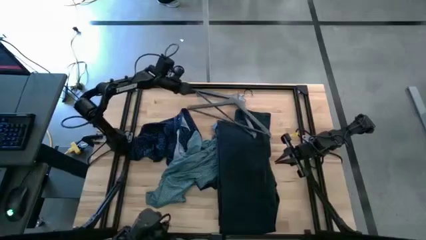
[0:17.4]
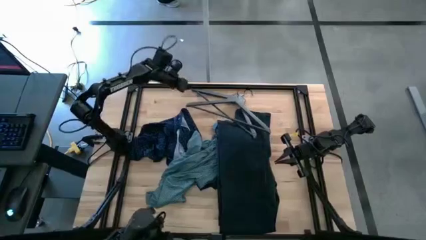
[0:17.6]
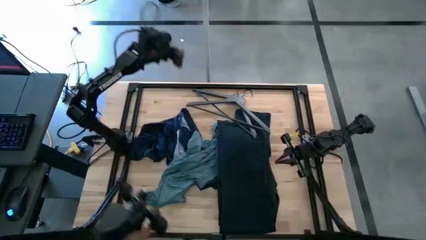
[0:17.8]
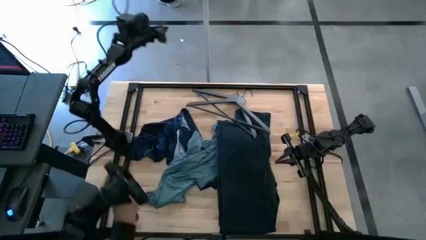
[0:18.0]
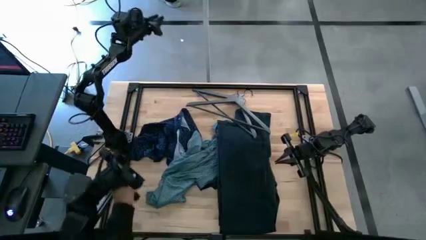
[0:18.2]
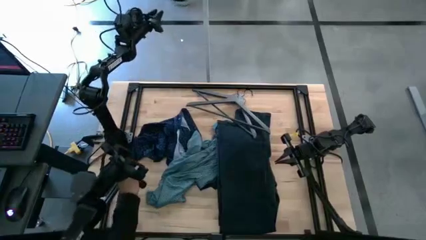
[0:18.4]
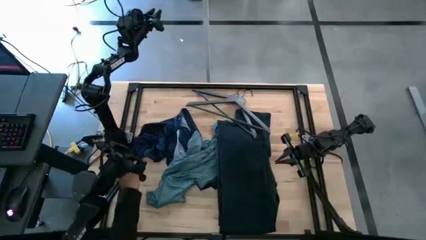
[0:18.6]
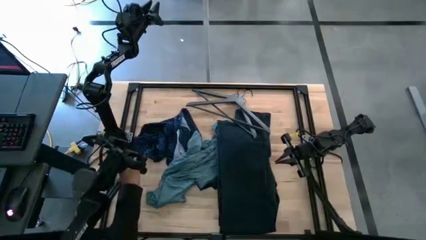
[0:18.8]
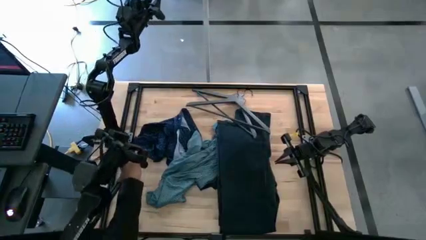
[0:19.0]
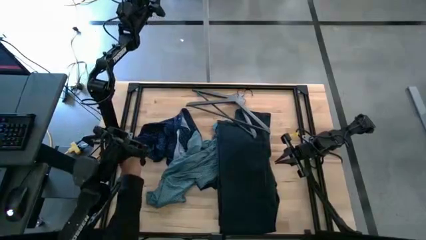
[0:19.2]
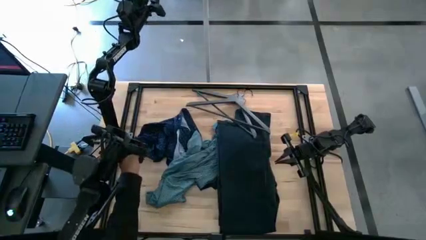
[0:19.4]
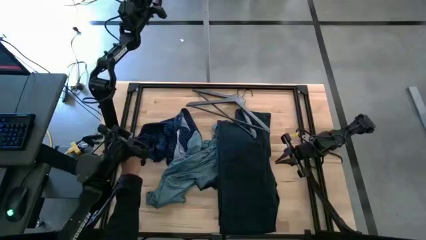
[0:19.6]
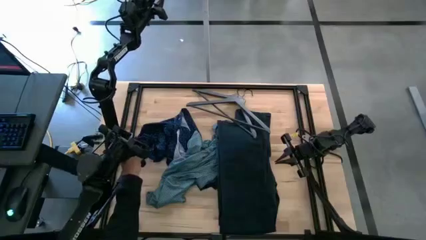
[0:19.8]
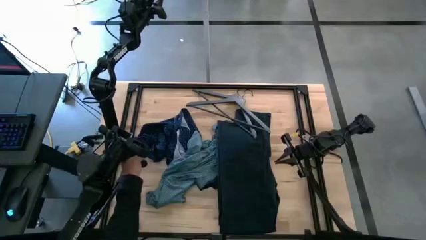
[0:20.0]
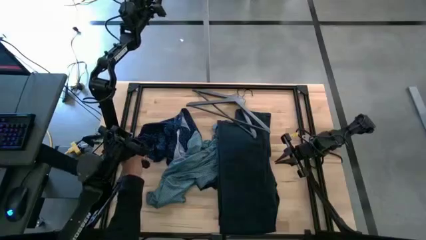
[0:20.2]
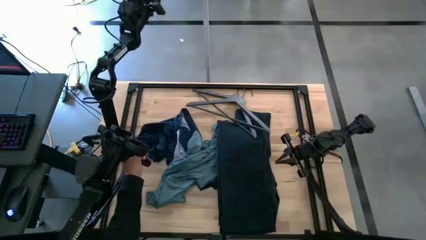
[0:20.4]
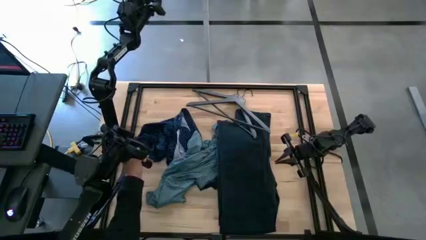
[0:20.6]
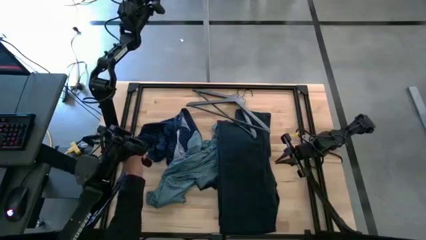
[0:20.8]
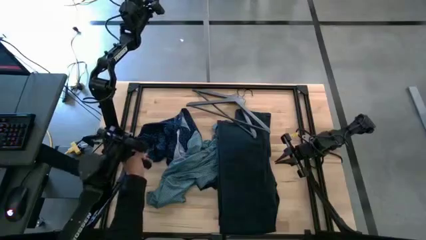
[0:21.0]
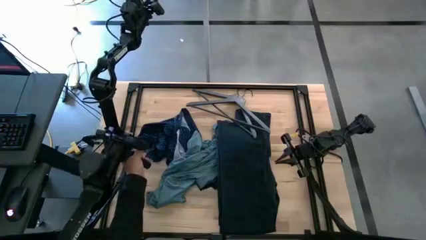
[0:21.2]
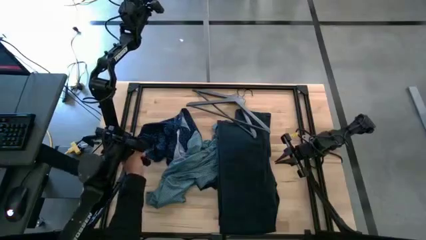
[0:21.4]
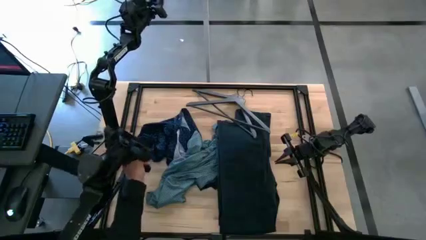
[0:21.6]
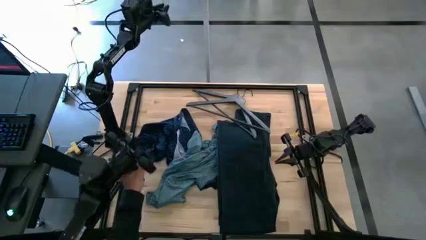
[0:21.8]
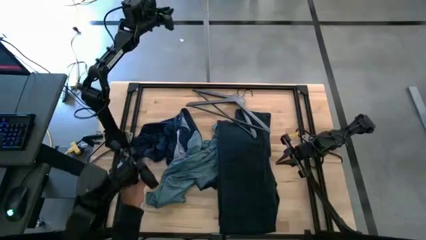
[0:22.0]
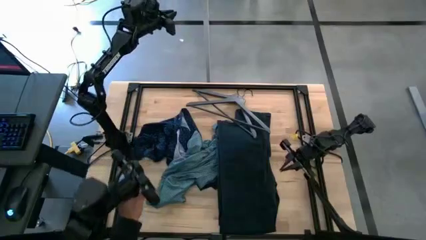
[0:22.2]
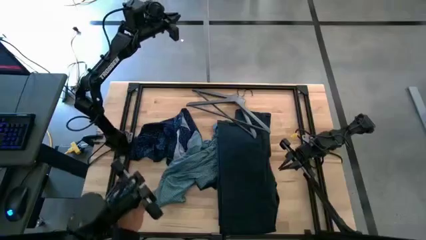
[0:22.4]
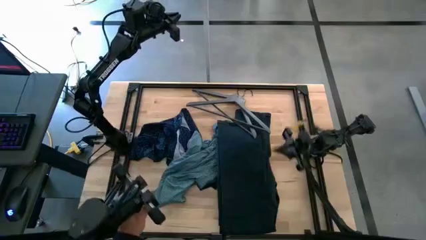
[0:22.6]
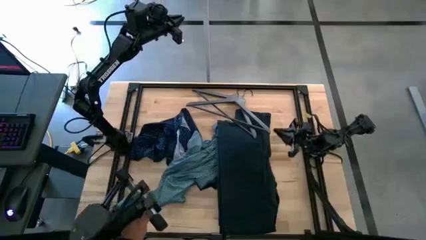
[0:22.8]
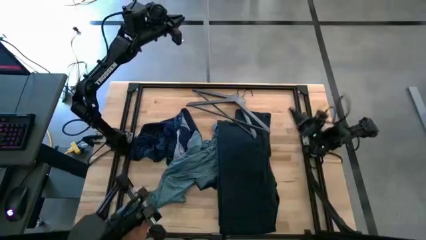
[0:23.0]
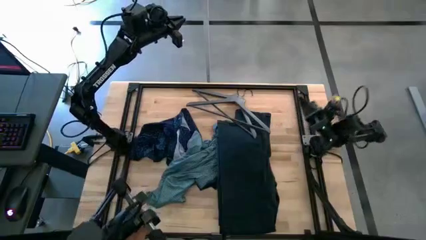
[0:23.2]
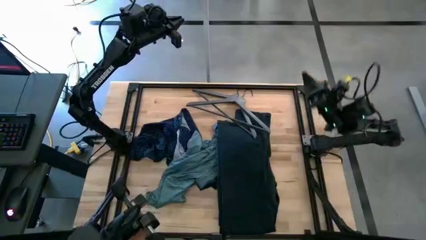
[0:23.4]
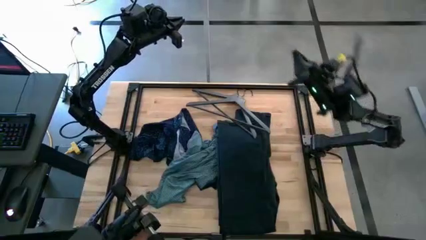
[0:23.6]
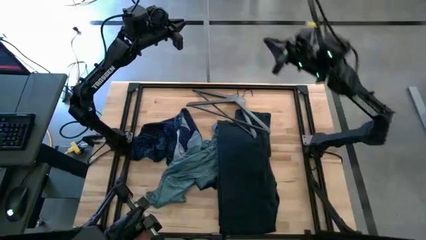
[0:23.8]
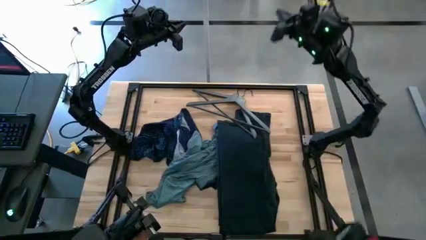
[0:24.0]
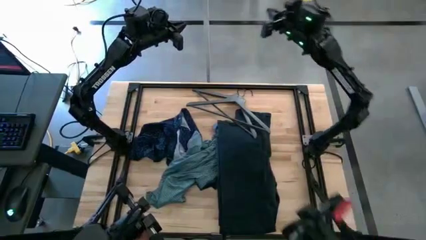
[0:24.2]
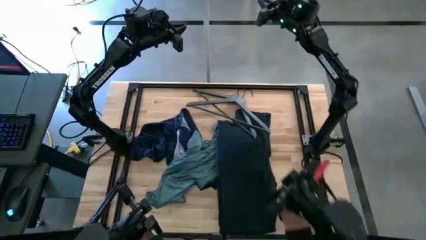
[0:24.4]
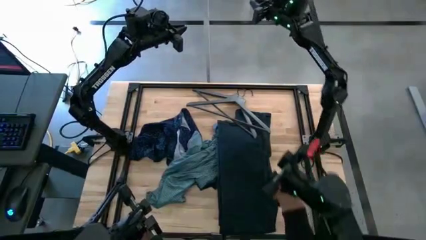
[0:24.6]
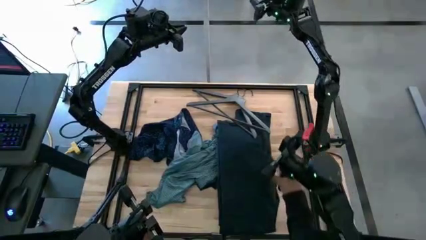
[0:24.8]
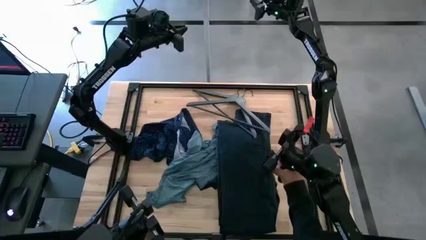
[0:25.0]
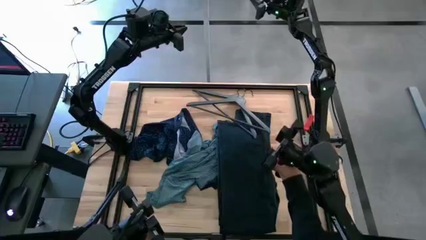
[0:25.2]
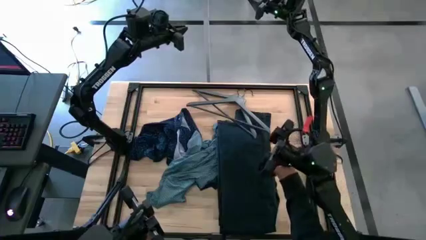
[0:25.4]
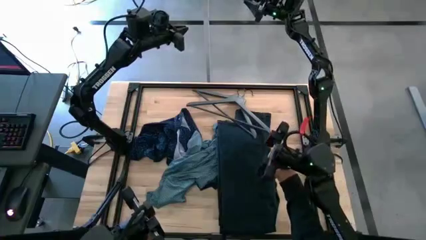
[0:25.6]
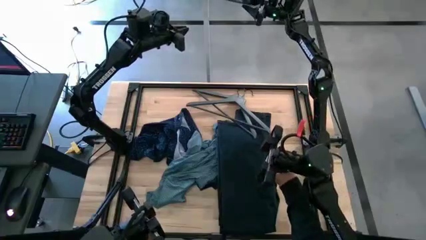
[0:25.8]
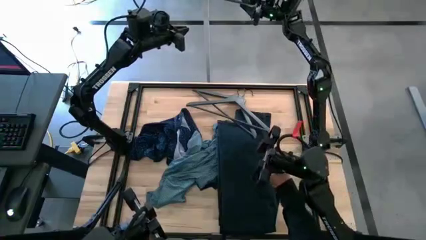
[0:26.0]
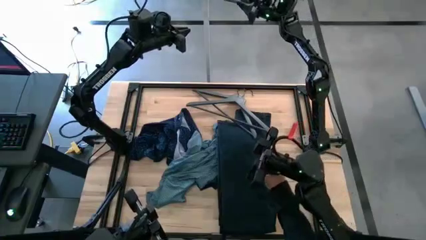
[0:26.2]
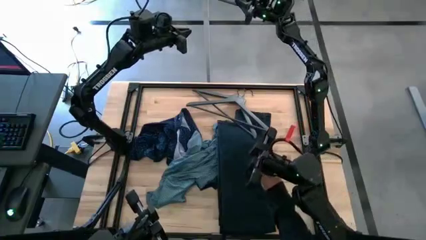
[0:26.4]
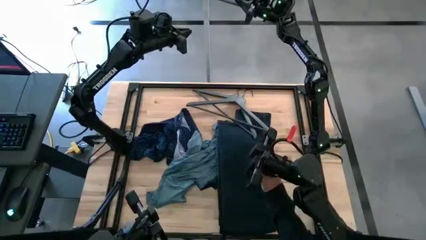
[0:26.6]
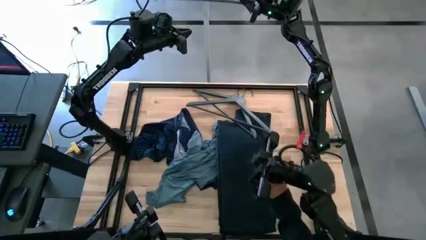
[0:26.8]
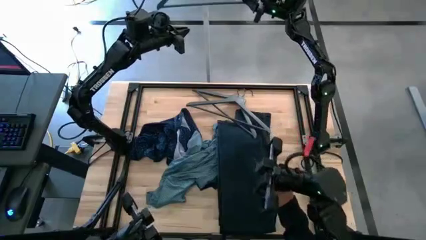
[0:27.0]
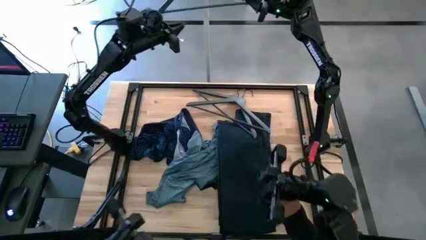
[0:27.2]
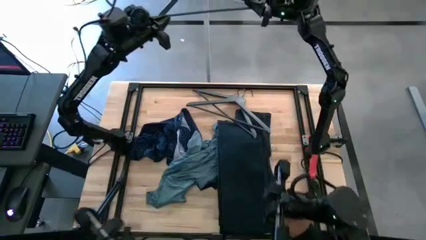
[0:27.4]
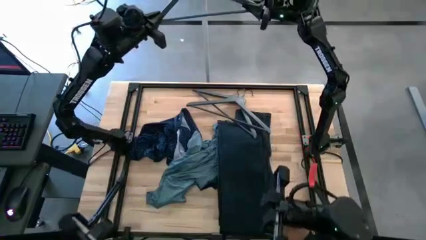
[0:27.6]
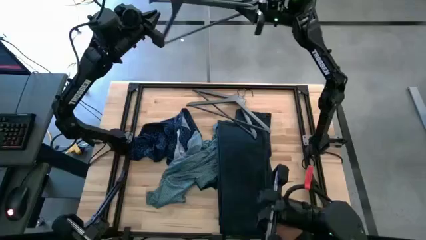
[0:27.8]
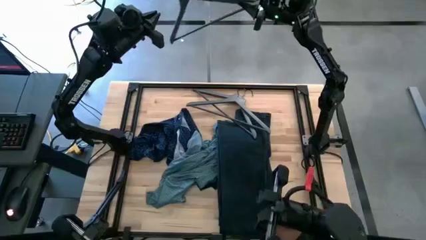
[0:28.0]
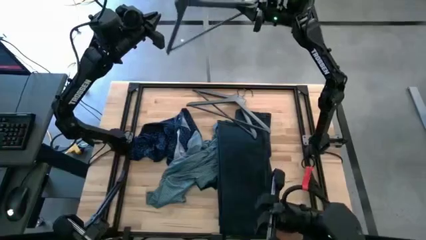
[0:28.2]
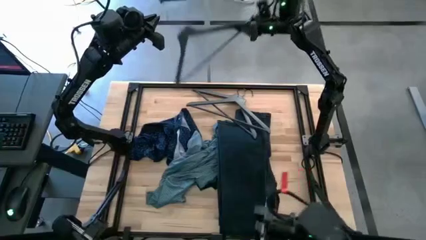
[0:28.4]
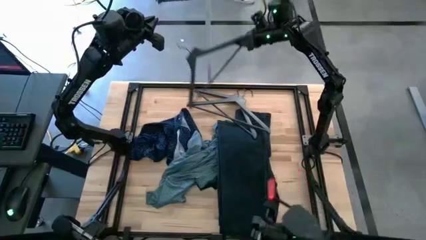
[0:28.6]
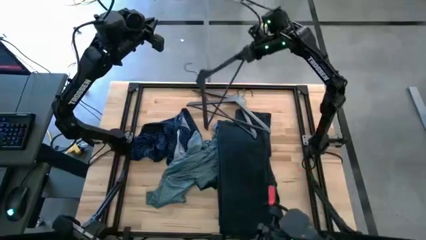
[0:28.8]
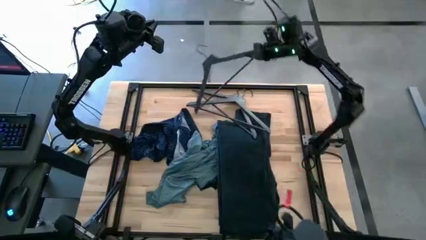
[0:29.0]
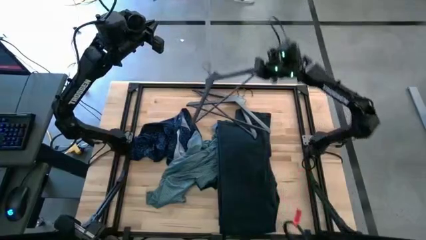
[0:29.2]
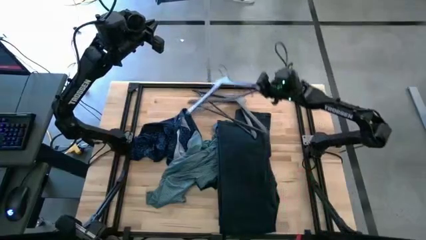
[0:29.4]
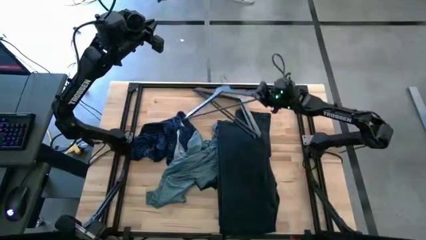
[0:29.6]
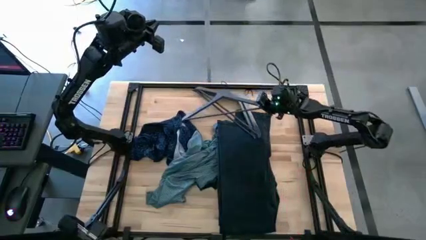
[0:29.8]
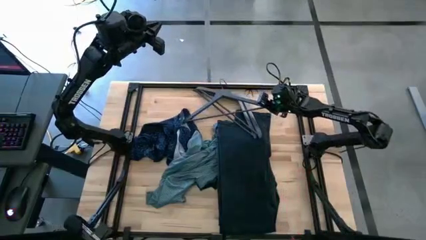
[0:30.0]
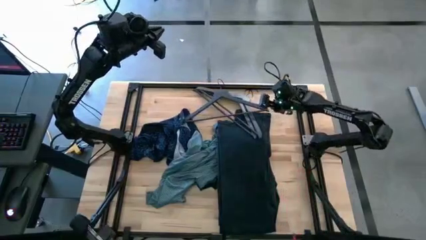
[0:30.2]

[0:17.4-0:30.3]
Task: Hang clothes
Unhang the hanger from the hanger rack
